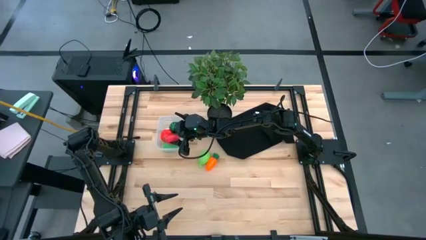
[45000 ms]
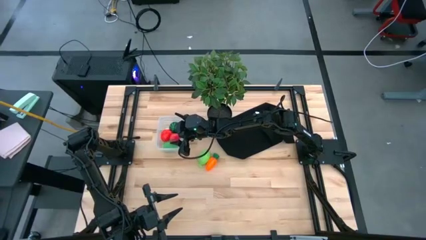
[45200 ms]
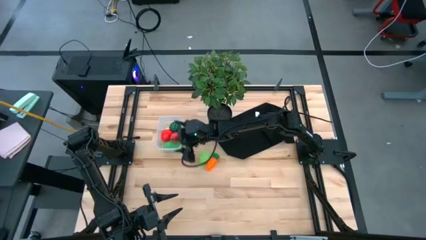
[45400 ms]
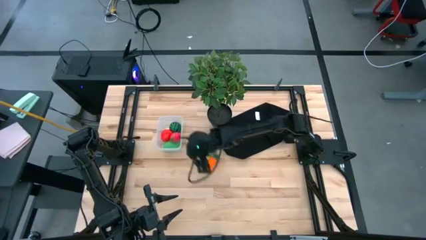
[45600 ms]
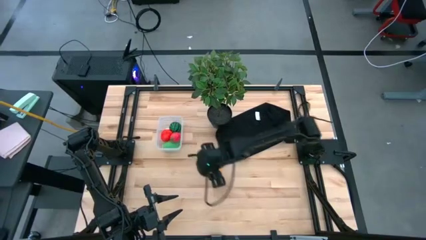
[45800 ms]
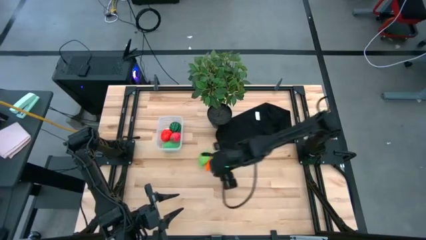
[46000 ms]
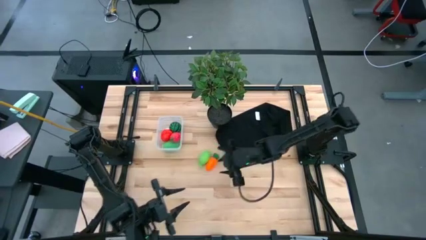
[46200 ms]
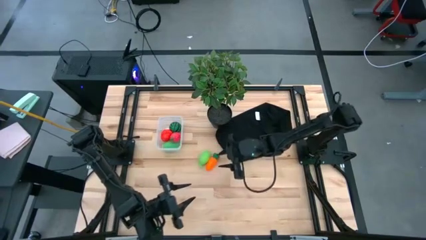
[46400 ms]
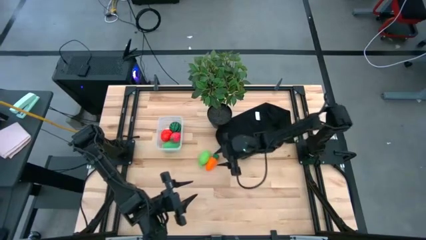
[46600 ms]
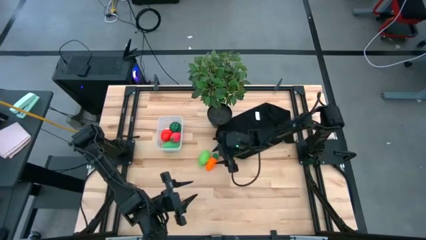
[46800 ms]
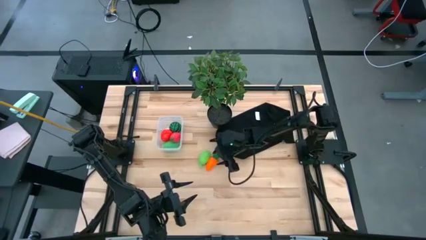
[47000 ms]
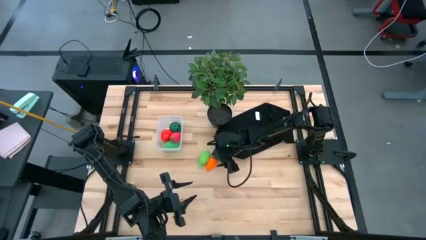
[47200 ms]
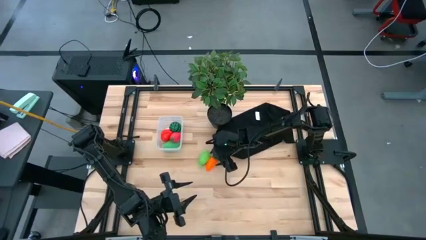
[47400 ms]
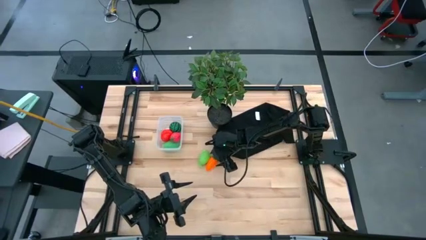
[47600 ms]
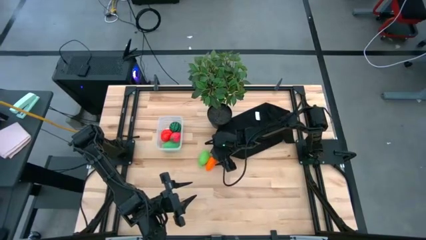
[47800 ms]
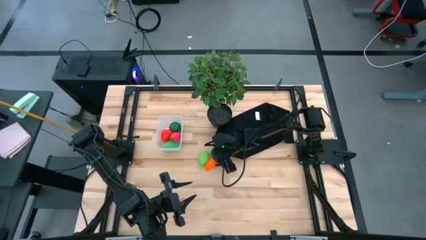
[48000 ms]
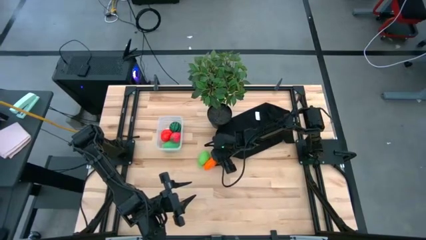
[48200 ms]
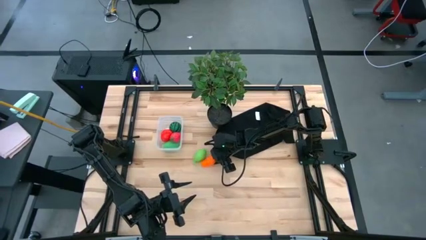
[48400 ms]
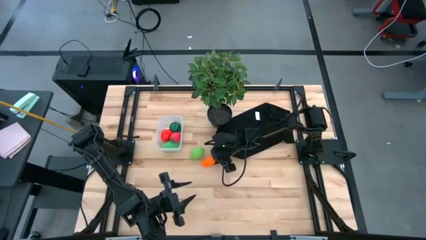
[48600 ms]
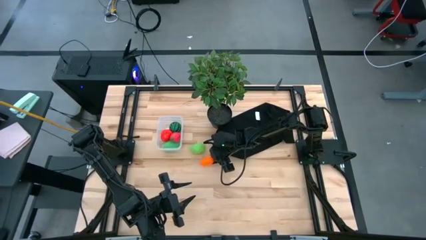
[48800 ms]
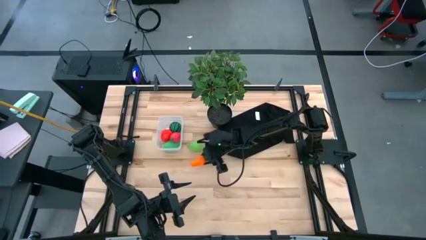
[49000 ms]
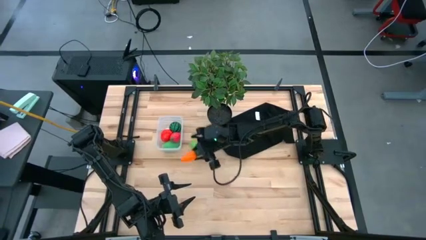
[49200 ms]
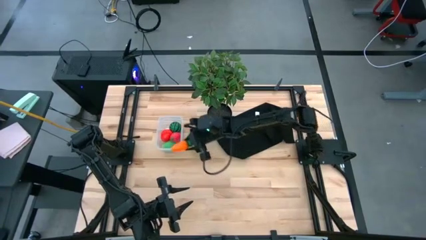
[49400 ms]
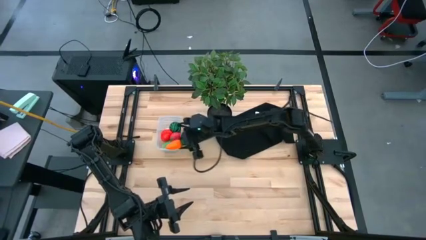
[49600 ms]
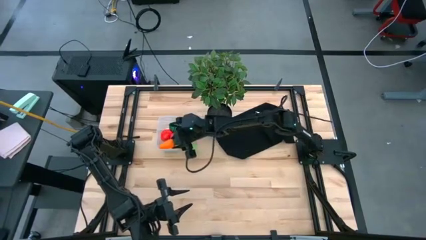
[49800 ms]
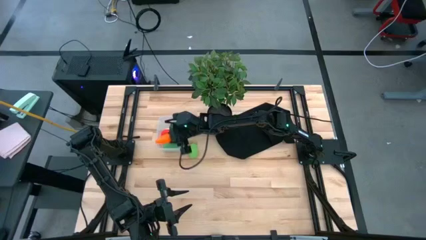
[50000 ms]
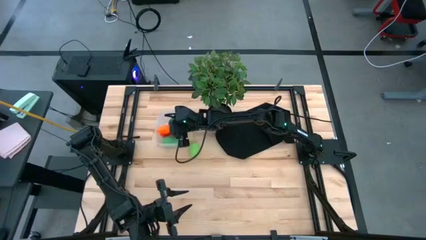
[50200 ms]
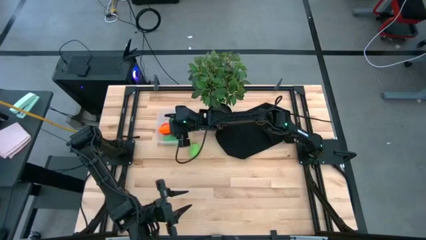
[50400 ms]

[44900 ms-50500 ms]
Task: Pick and placing Produce into tupperware
Put the carrot into the bin

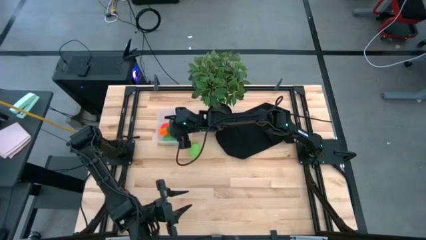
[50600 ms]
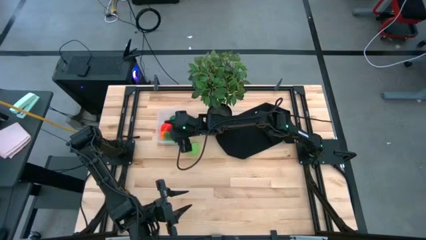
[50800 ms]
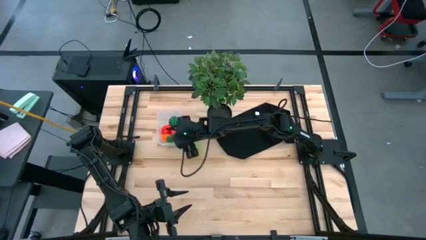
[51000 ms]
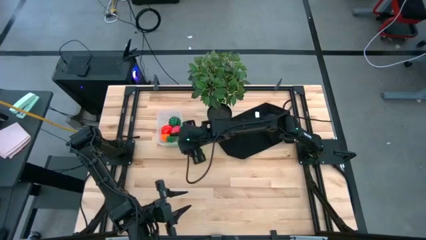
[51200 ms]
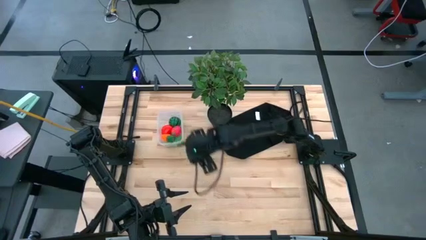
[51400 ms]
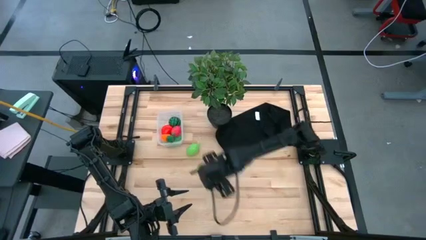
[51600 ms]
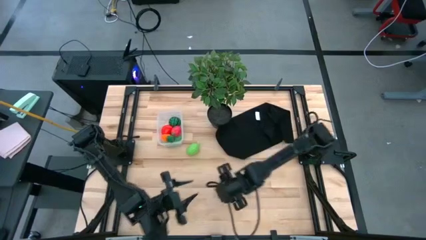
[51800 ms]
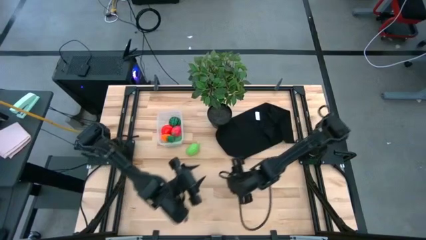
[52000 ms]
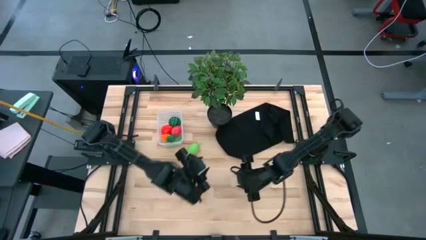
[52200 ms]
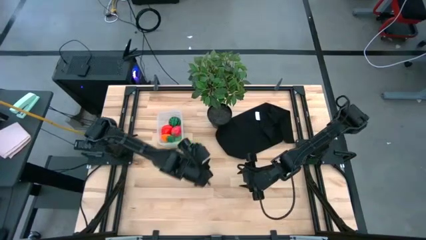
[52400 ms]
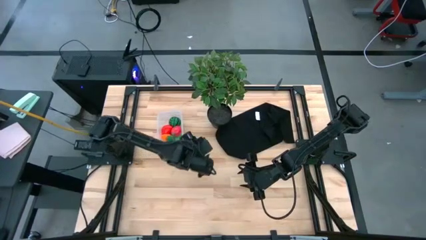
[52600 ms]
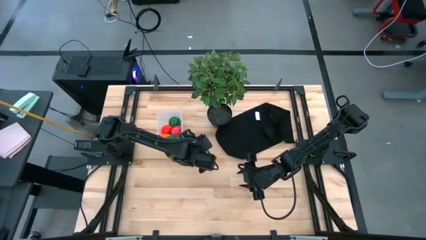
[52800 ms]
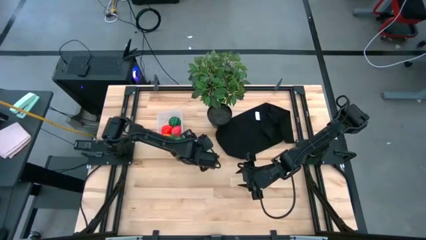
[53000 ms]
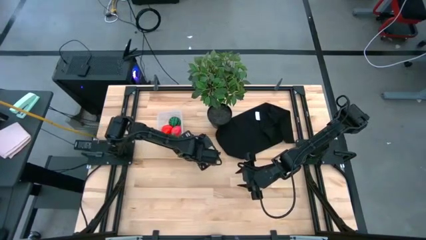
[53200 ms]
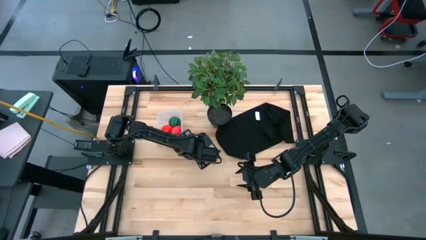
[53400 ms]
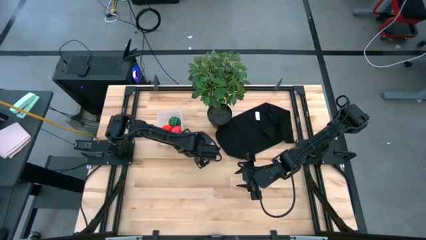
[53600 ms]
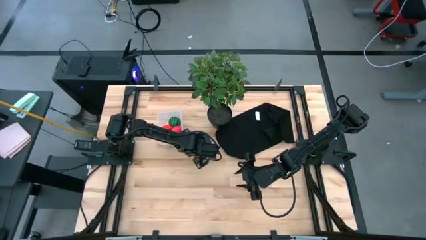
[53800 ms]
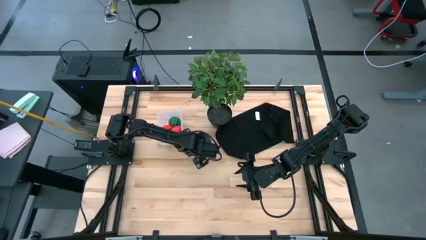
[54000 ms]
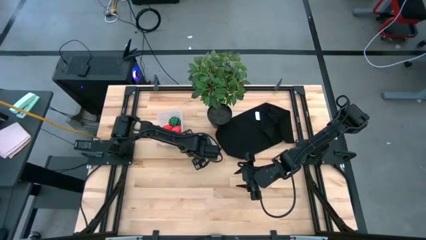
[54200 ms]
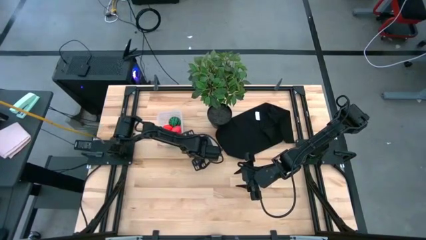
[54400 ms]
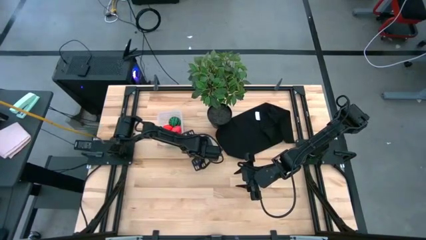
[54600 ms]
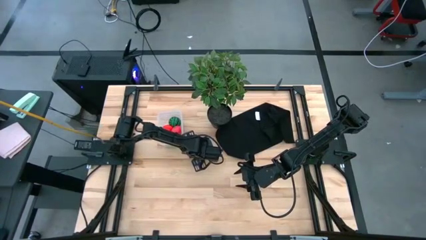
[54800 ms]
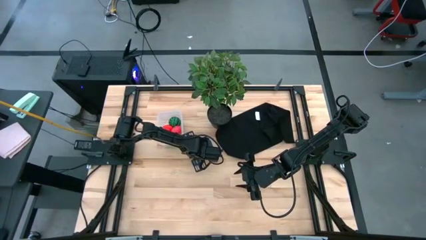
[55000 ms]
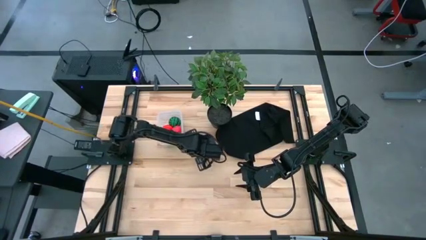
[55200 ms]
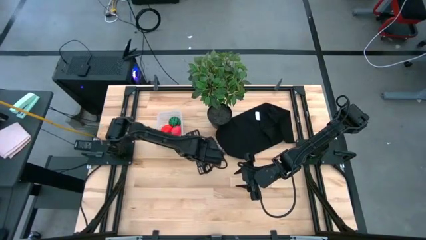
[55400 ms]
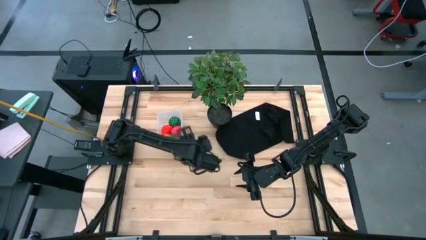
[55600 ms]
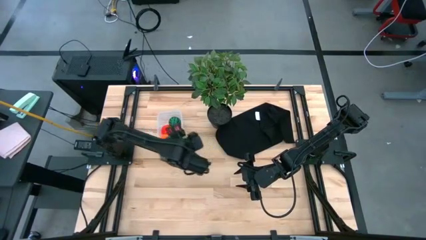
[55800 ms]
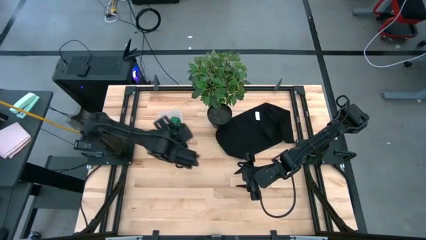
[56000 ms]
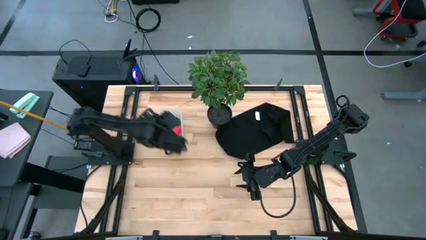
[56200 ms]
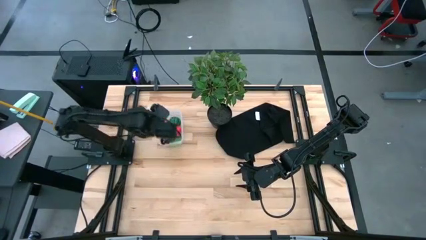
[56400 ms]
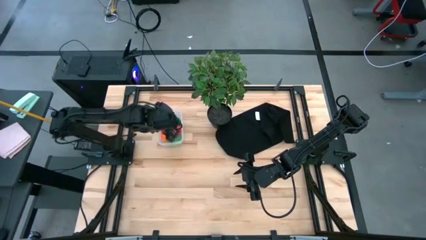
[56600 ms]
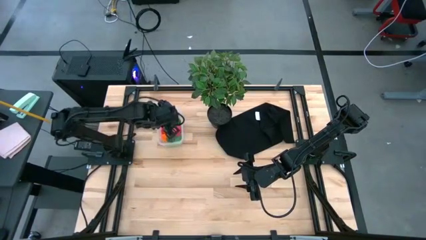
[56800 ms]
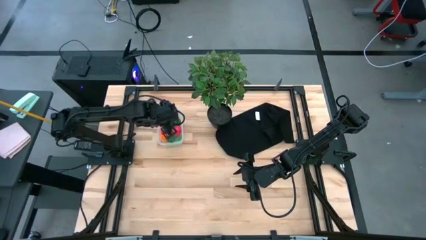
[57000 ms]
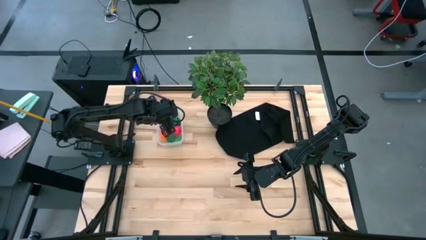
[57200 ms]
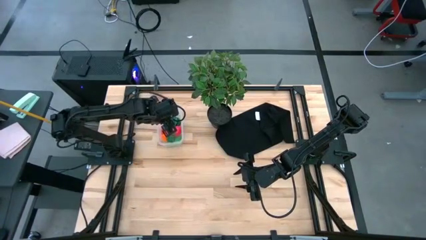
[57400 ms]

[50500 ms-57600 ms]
Put the melon into the bin

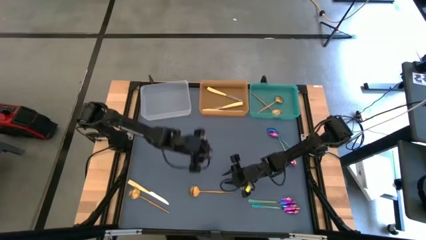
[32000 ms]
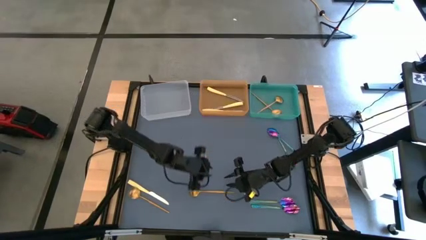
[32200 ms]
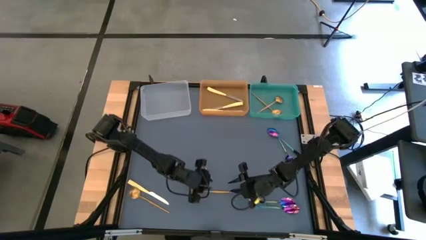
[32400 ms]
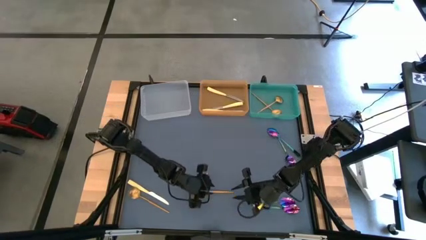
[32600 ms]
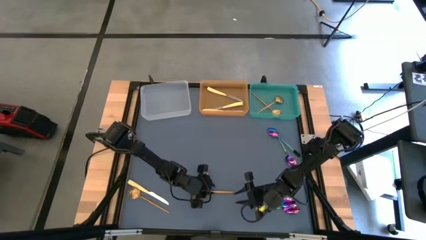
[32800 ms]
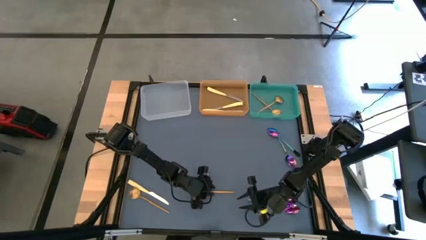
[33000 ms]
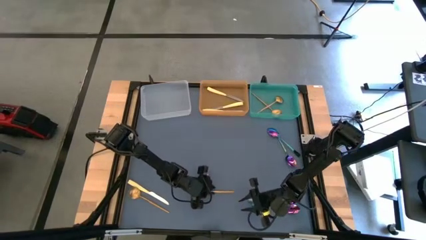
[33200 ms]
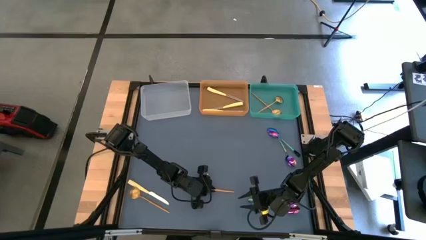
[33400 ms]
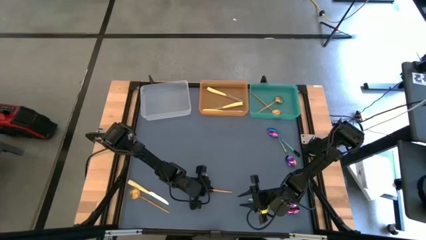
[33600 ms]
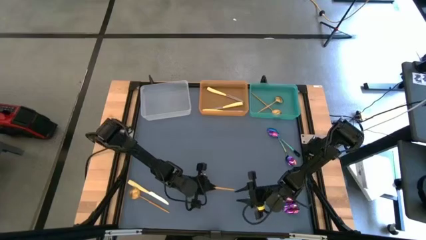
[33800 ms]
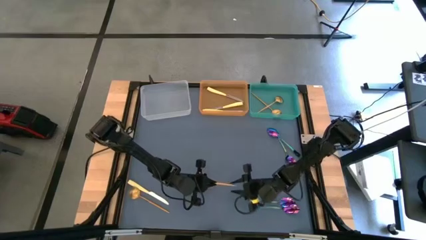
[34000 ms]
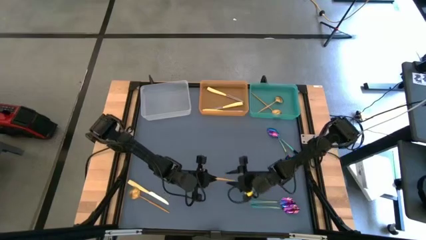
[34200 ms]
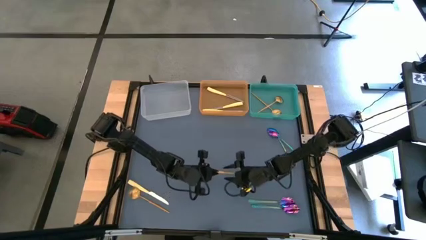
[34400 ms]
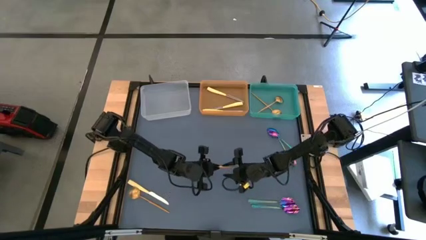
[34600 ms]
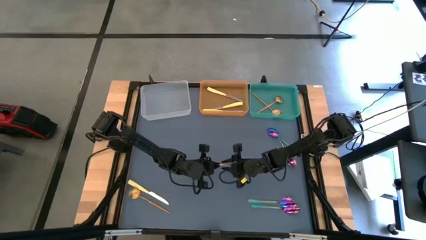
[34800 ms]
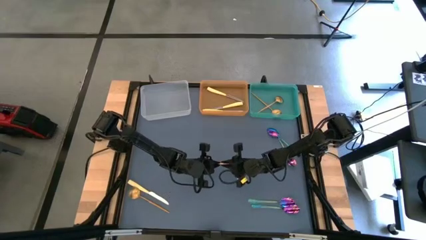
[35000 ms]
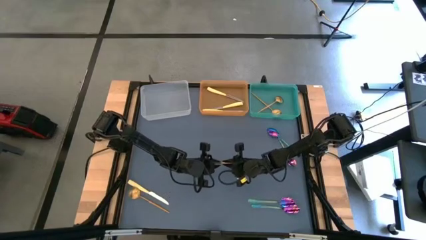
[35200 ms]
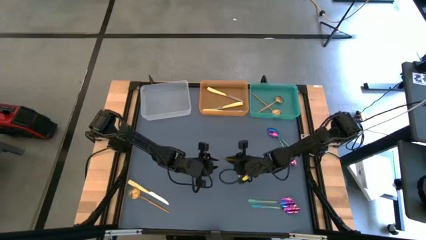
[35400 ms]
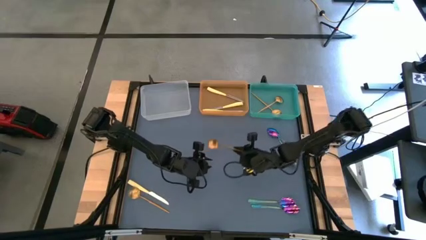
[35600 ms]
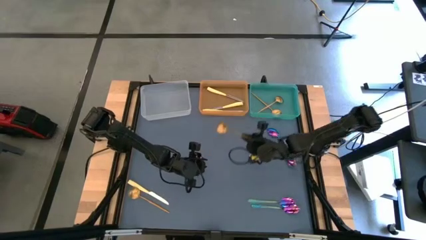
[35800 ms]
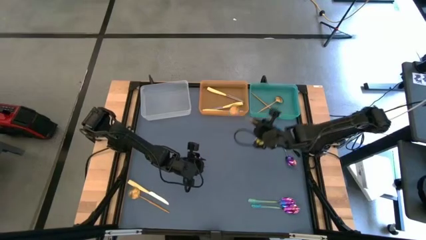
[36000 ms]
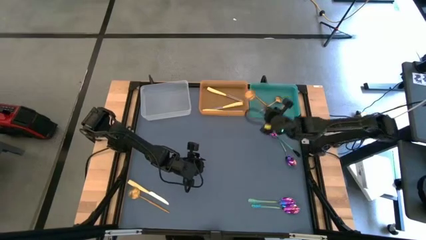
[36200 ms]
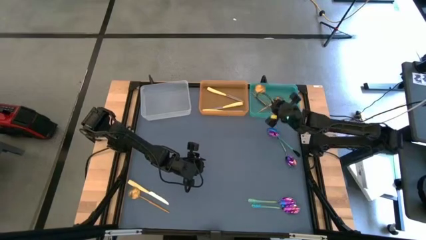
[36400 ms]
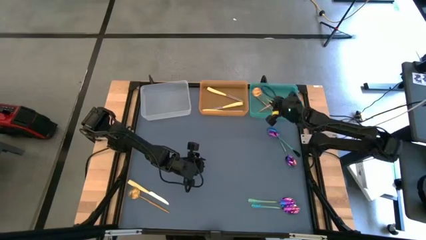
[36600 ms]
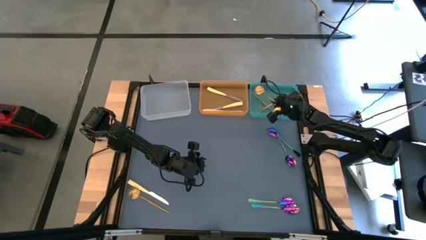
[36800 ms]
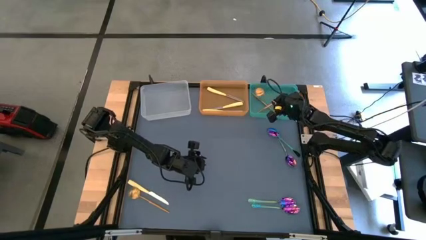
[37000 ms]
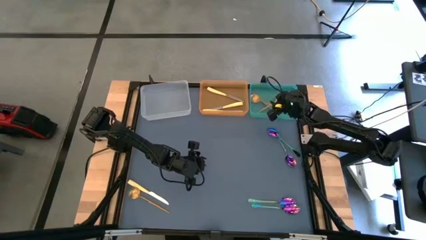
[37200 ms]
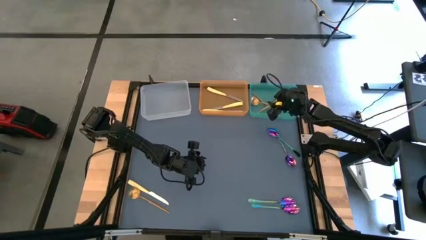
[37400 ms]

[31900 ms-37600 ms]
Task: Sort silverware by color (type)
Put the golden spoon into the green bin
